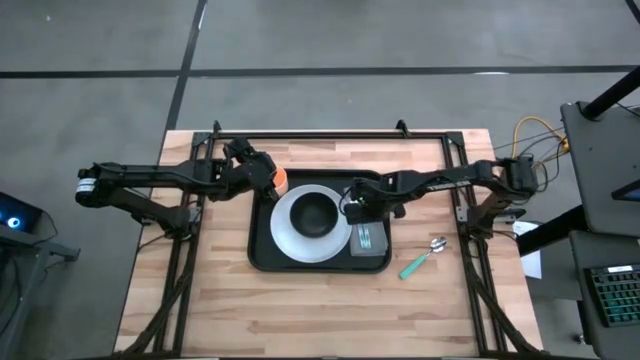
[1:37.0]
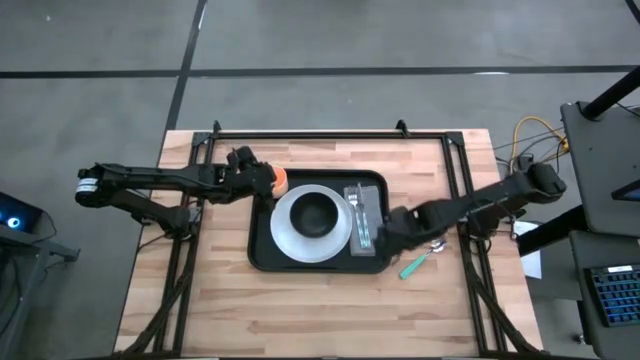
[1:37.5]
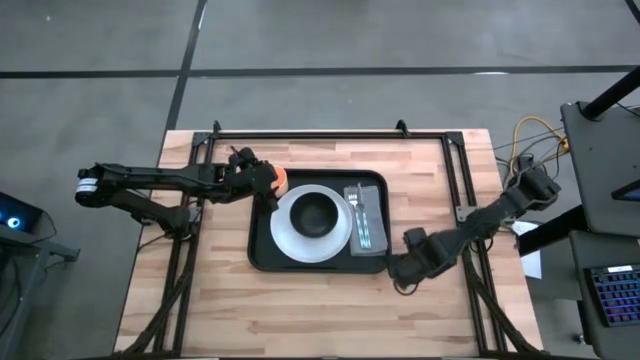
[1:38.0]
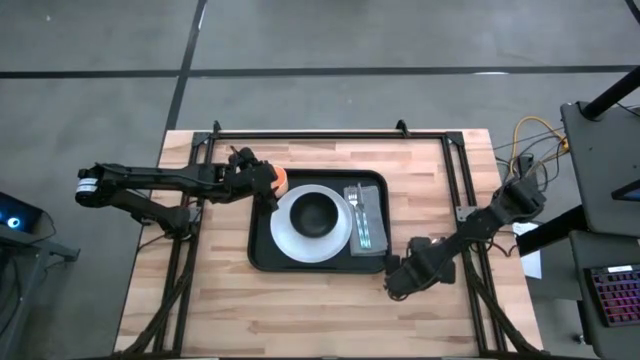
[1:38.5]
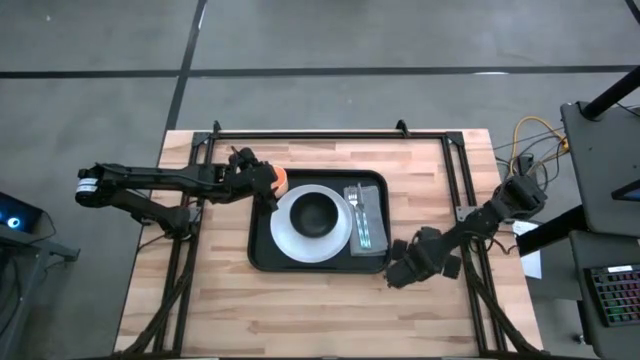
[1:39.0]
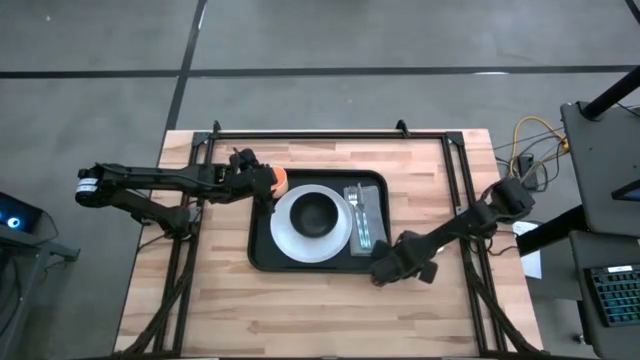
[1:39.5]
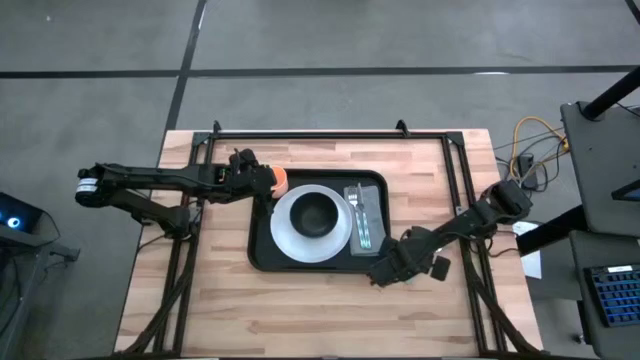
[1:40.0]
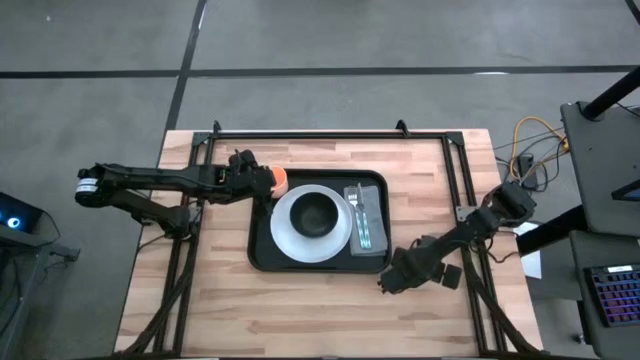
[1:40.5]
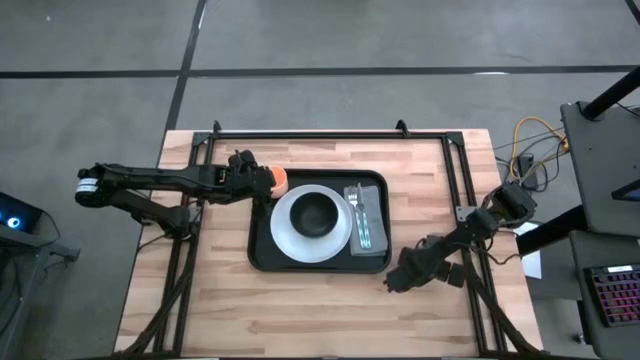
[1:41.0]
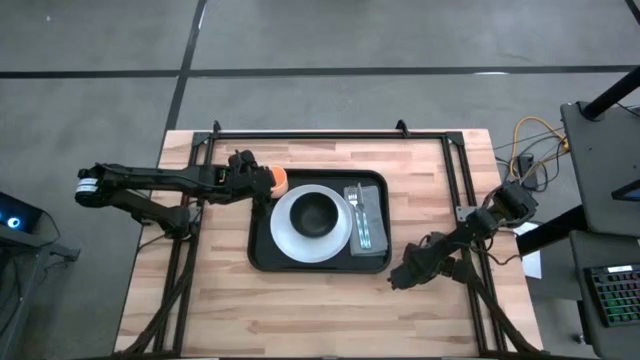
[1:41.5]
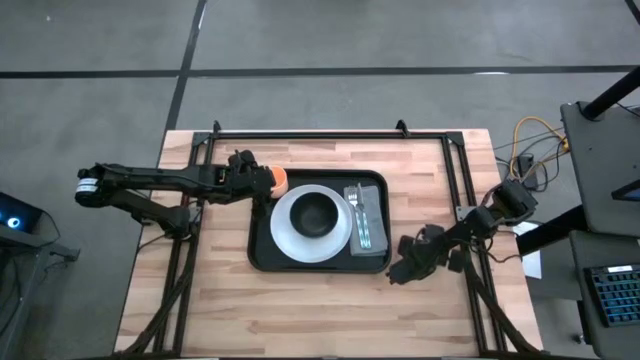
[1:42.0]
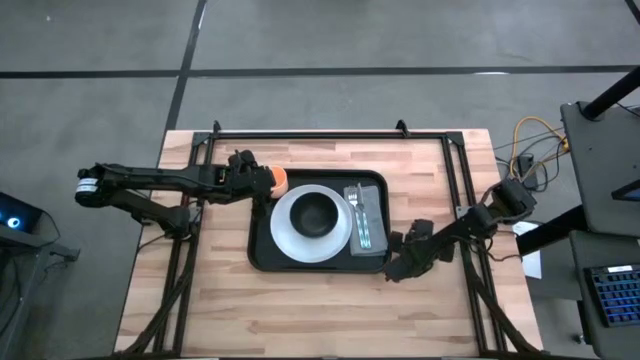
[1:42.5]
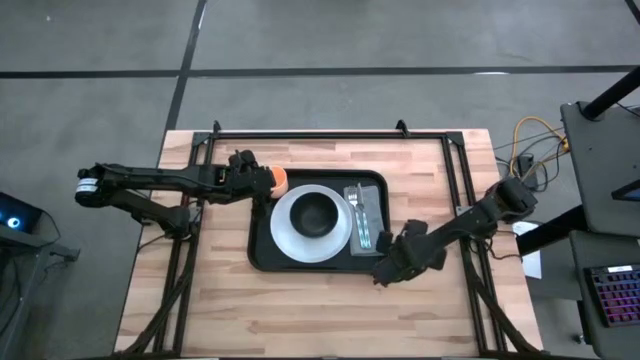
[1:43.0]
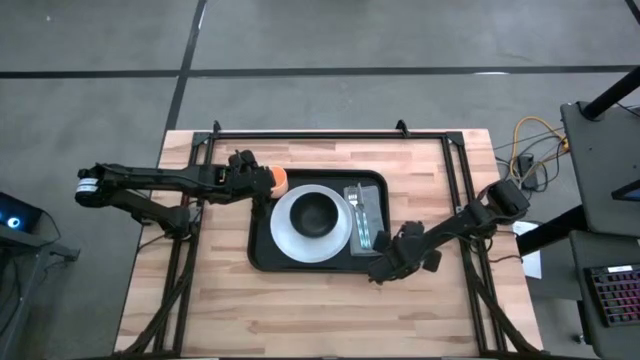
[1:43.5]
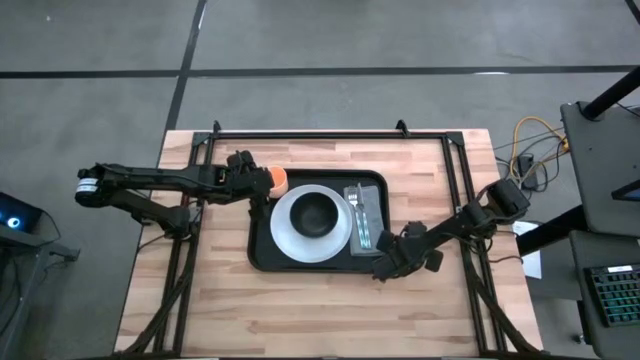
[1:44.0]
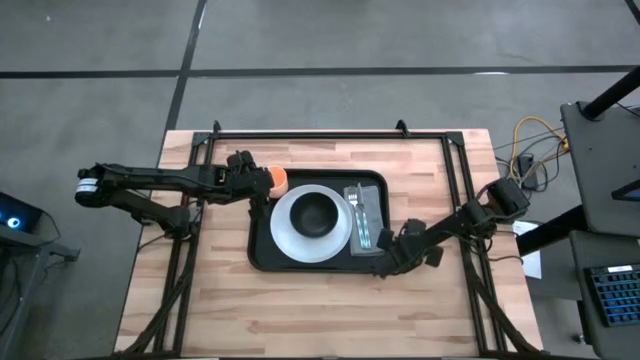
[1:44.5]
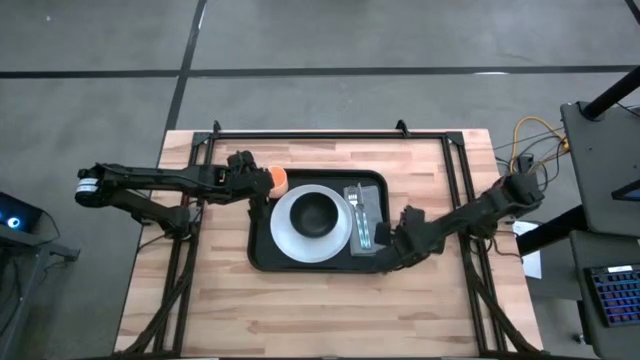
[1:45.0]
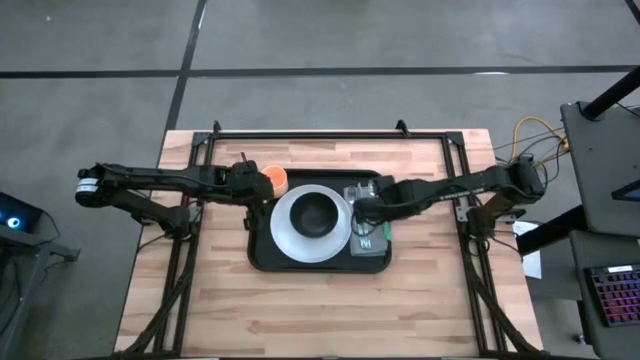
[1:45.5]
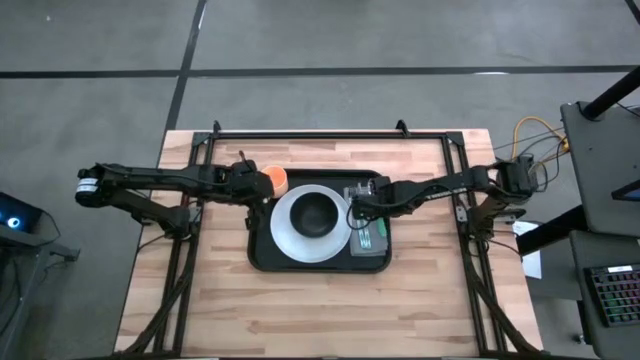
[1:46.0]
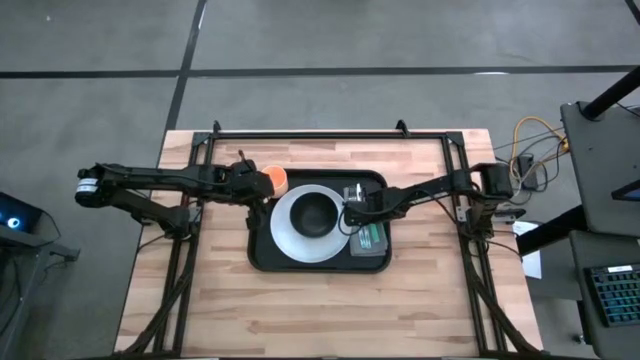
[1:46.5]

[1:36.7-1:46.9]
Task: Set up tray
Put the blue spoon on top of the gray table napkin to the right of the blue knife on the black serving tray

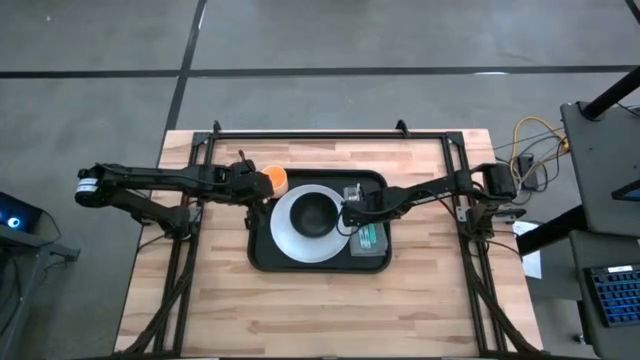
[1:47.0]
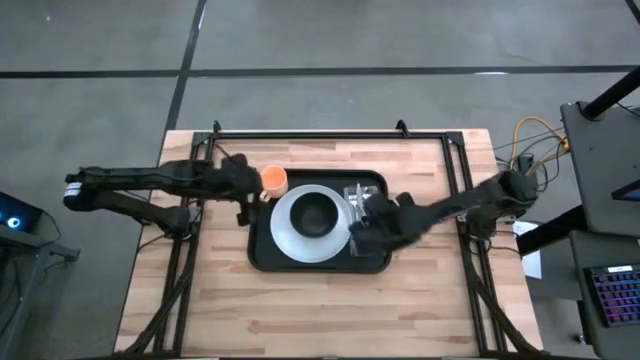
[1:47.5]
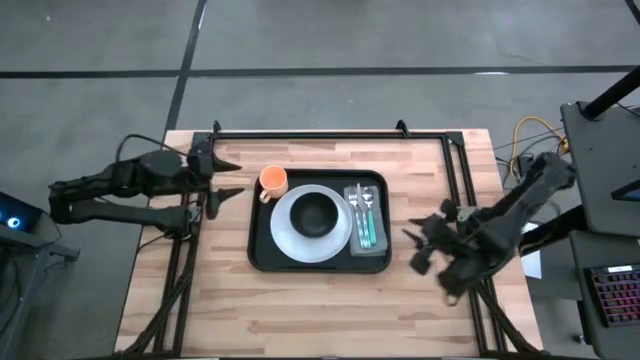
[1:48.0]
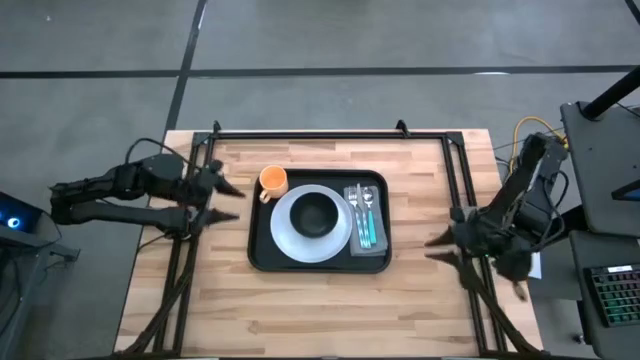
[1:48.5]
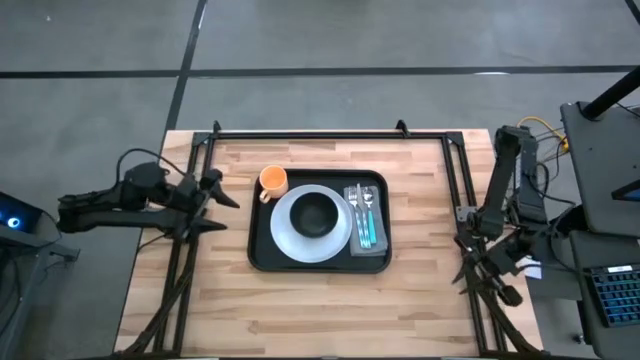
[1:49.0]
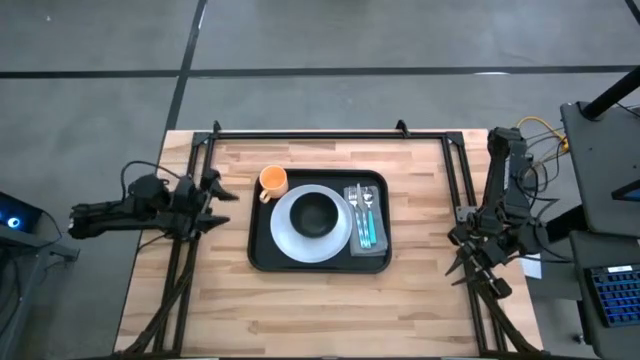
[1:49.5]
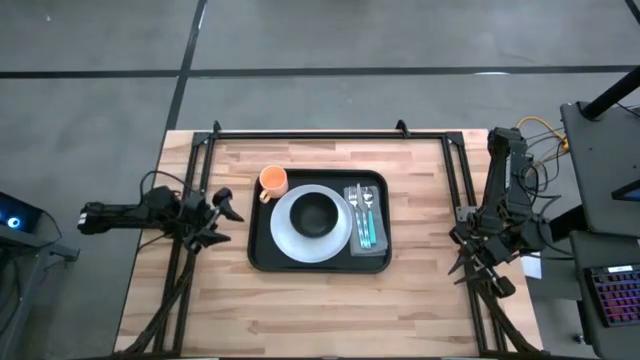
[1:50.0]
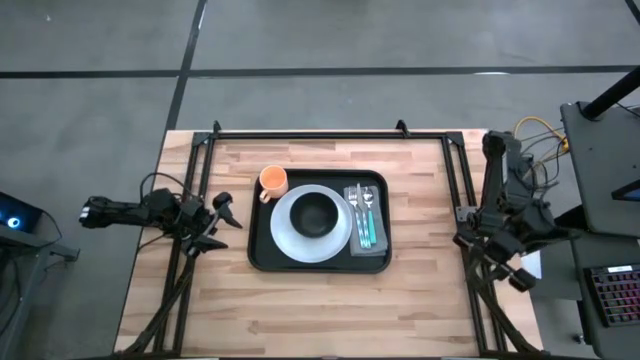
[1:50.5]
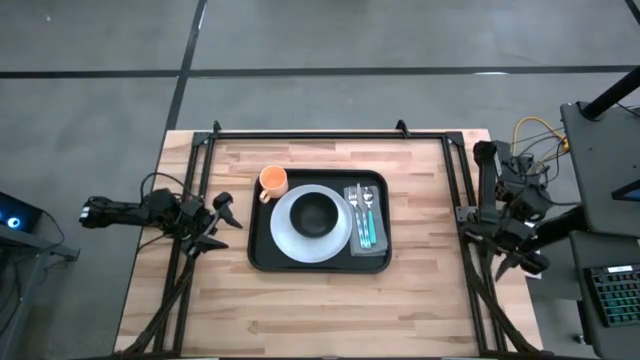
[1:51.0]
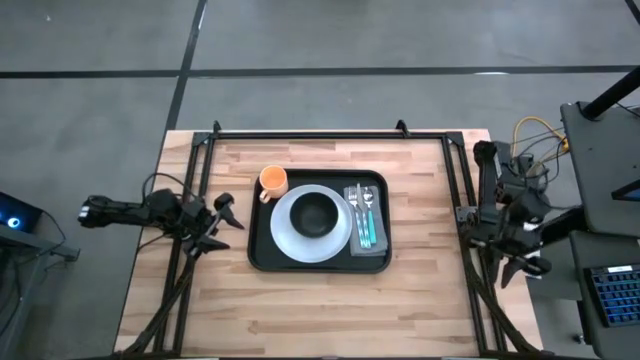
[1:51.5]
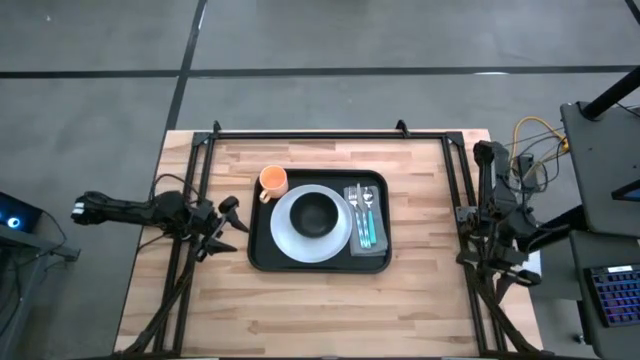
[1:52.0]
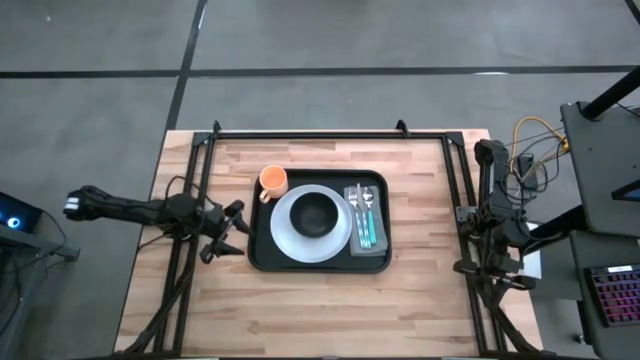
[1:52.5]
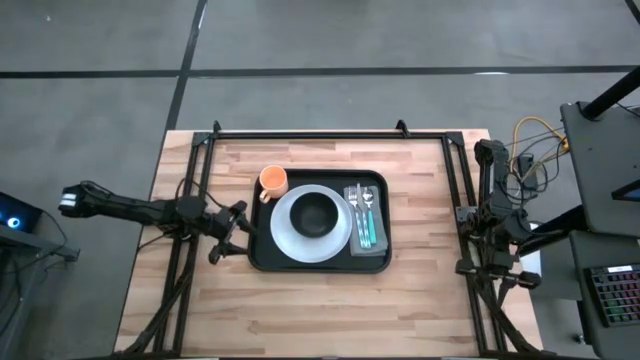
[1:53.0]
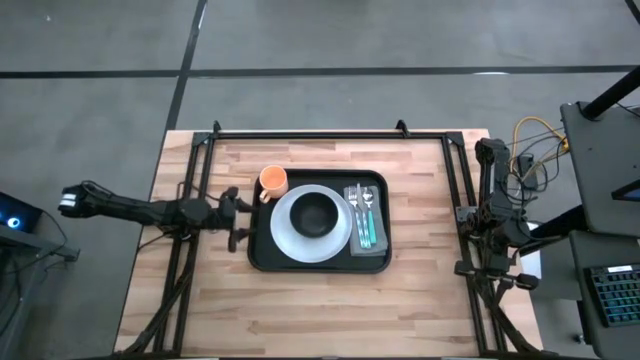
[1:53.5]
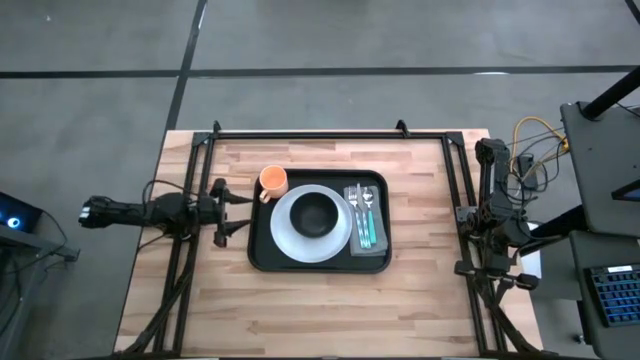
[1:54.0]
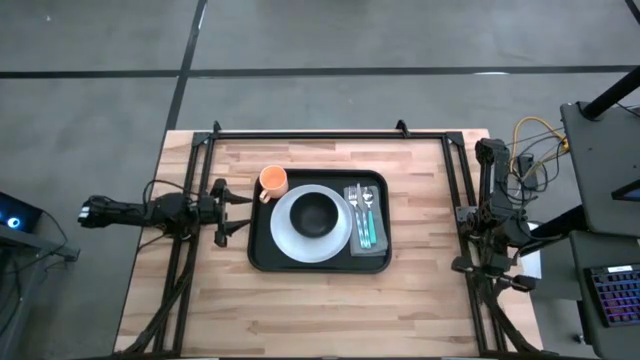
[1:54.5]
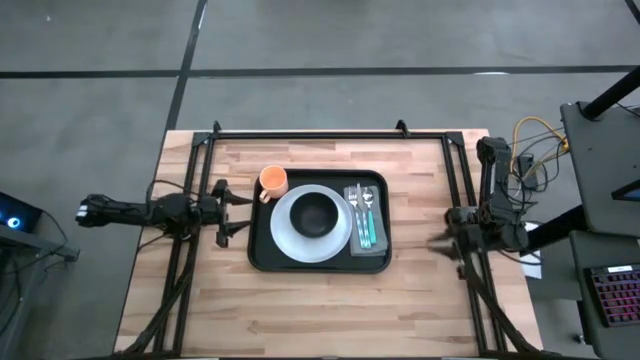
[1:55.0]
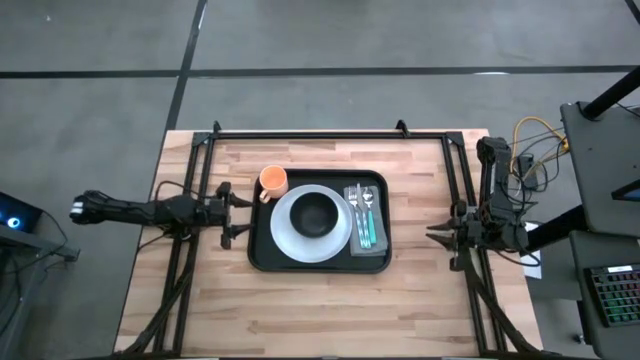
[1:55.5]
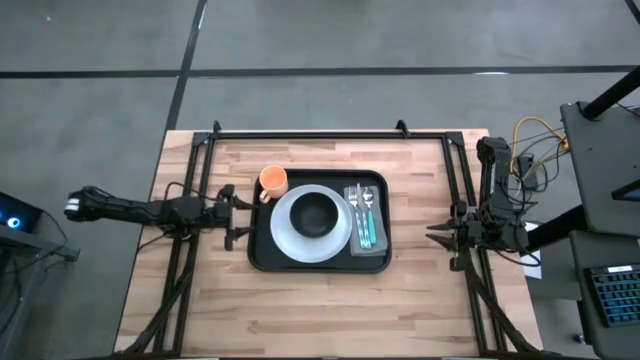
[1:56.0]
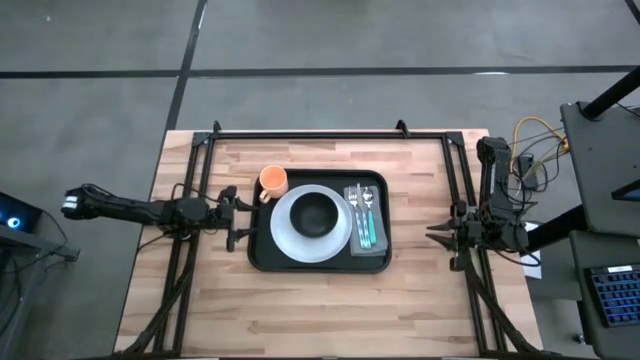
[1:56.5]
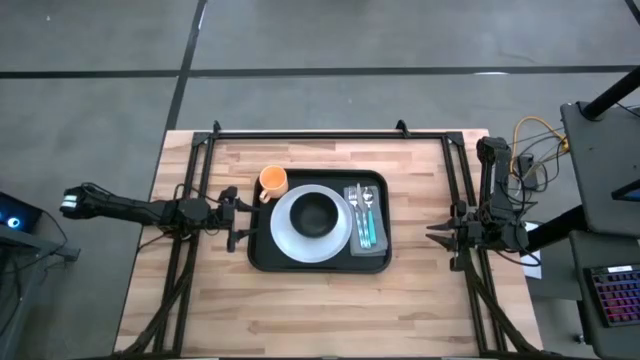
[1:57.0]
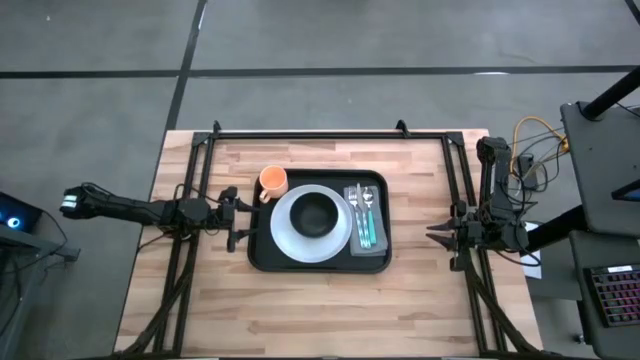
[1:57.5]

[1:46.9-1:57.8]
Return to Home Position

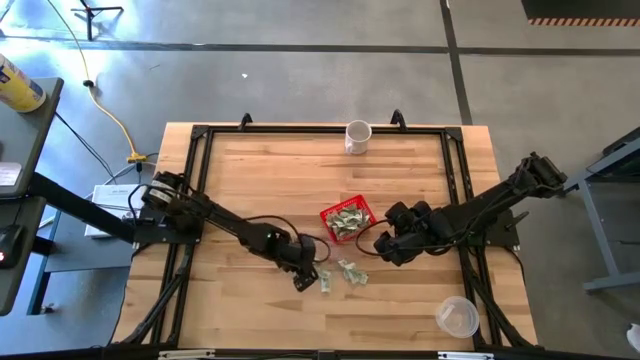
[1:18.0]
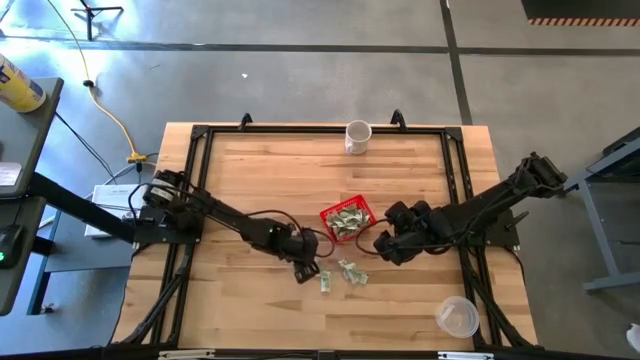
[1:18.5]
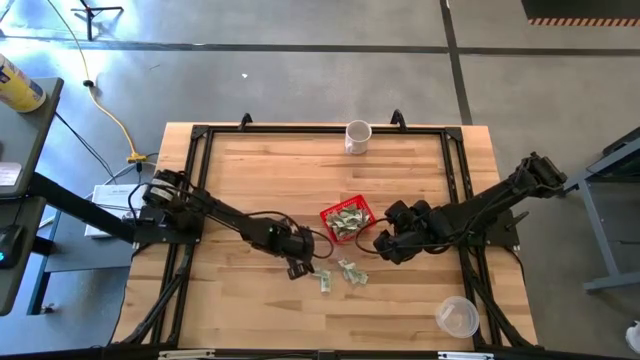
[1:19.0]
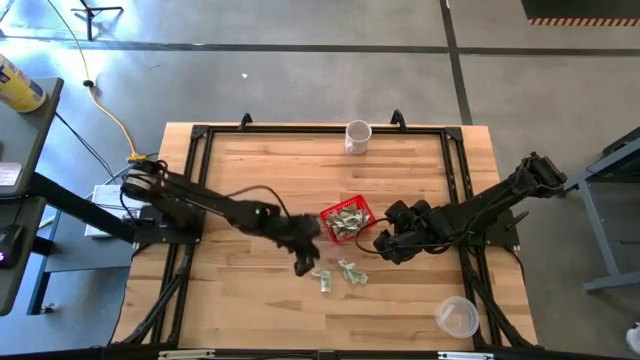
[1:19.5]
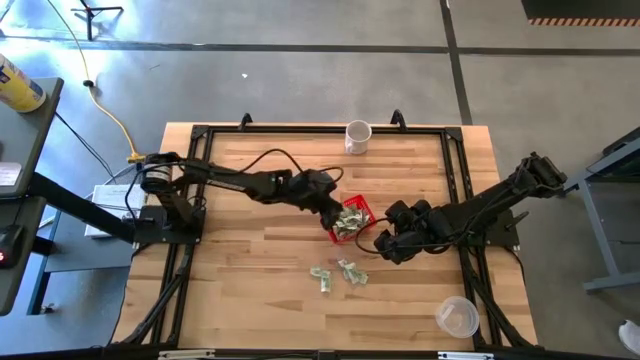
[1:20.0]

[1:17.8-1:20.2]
Task: Pick and place items into bin
Put the white stevia packet into the red bin
